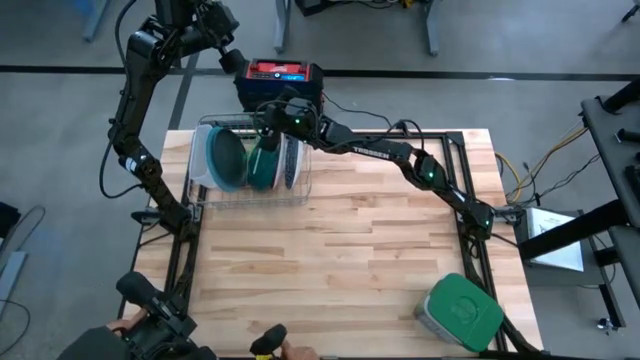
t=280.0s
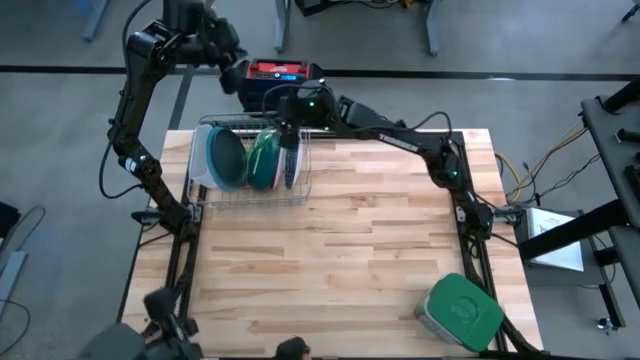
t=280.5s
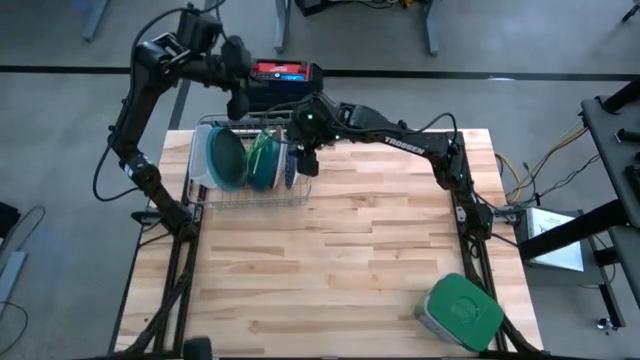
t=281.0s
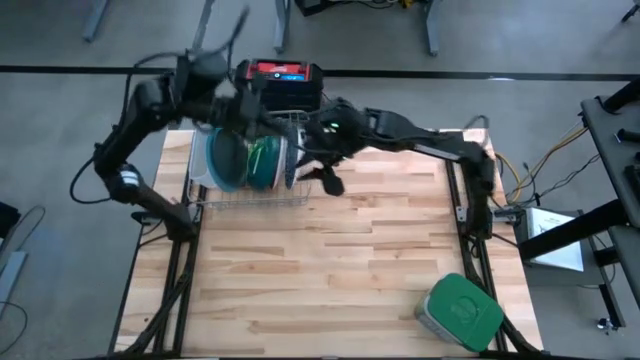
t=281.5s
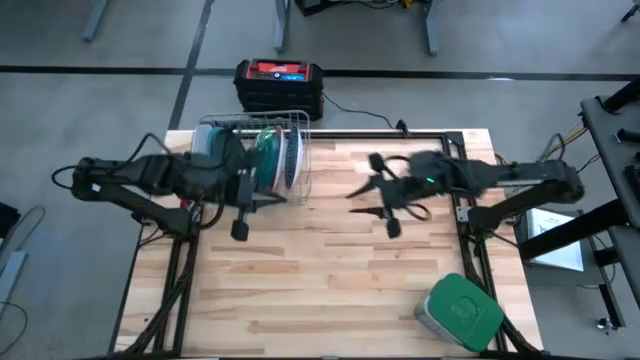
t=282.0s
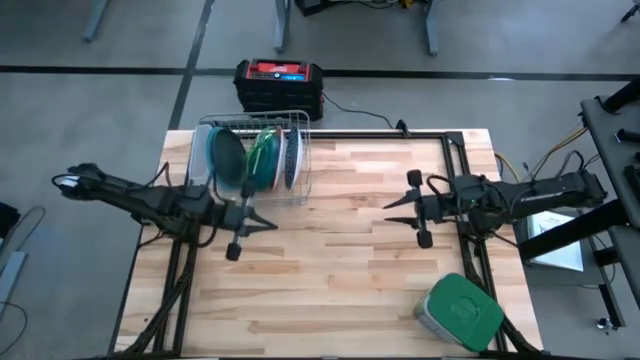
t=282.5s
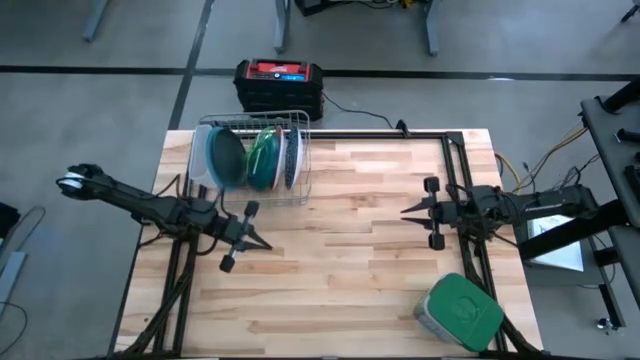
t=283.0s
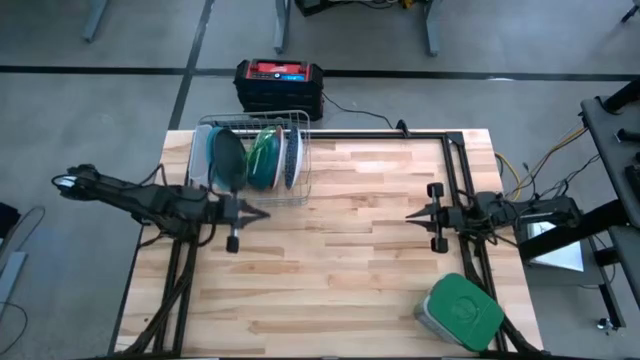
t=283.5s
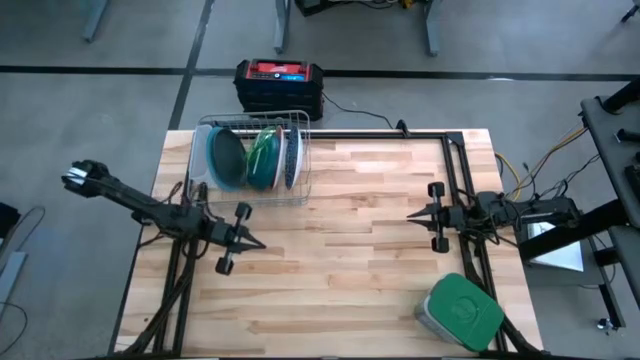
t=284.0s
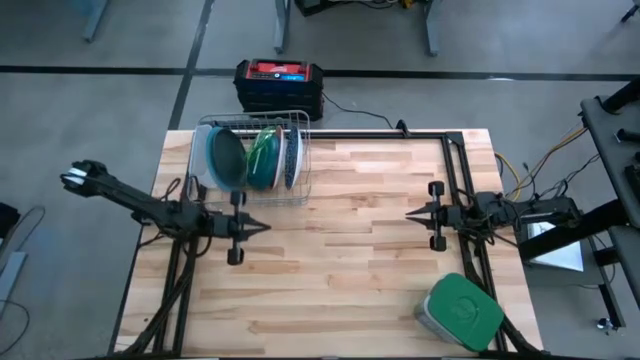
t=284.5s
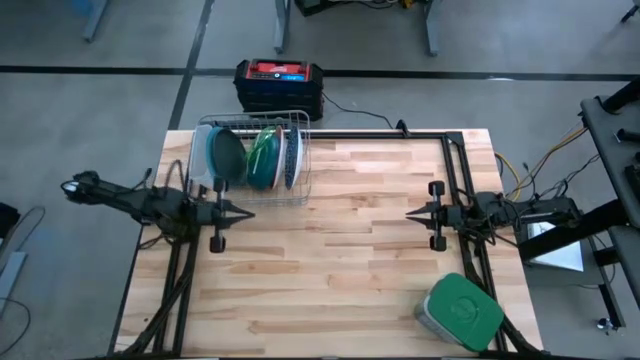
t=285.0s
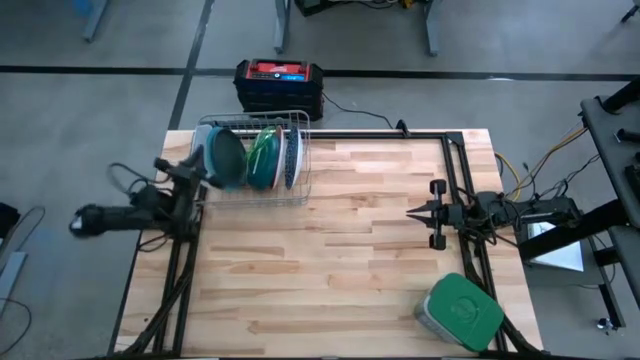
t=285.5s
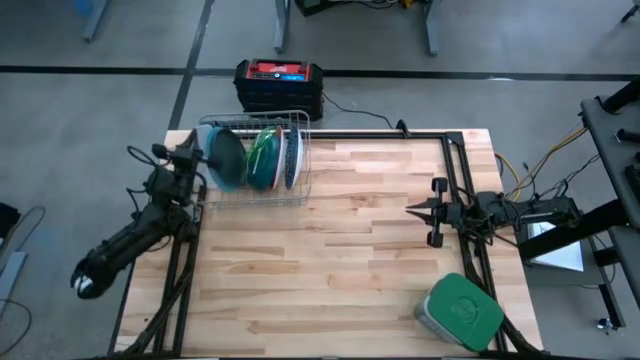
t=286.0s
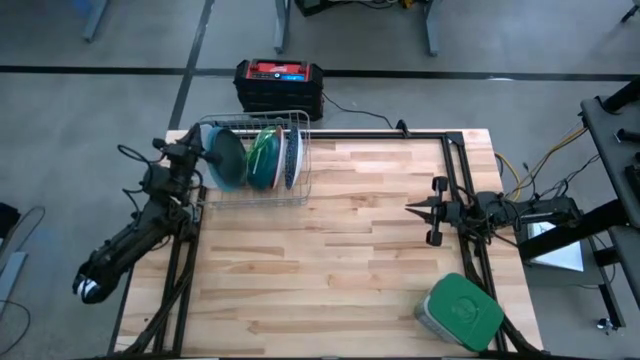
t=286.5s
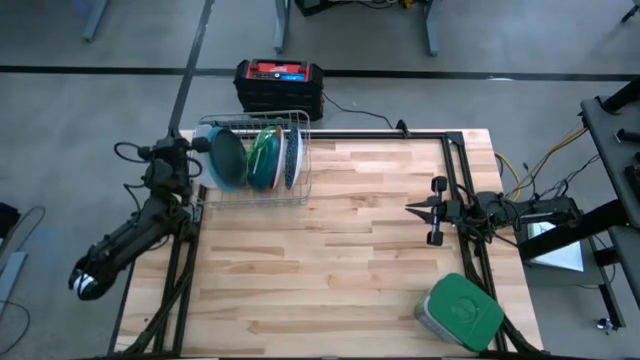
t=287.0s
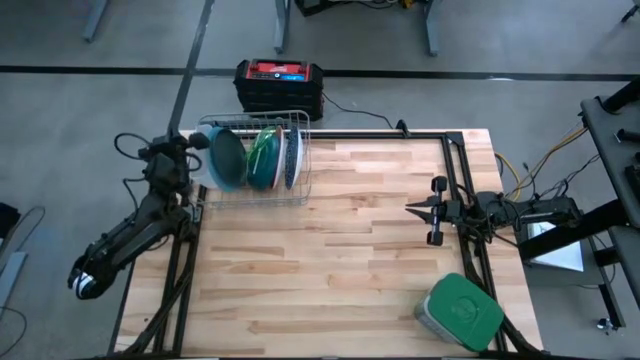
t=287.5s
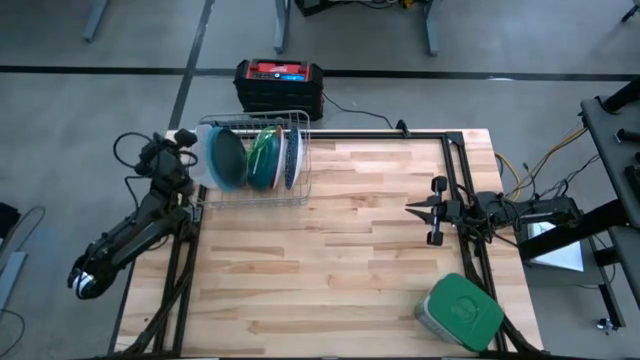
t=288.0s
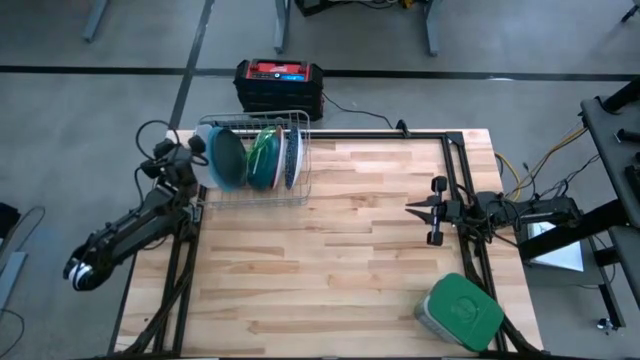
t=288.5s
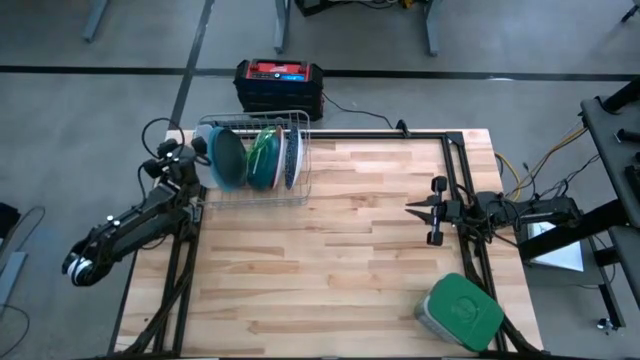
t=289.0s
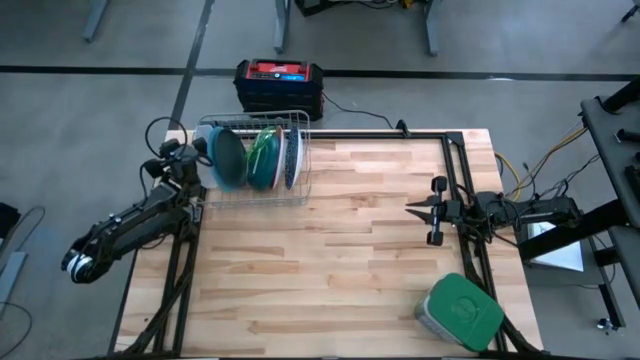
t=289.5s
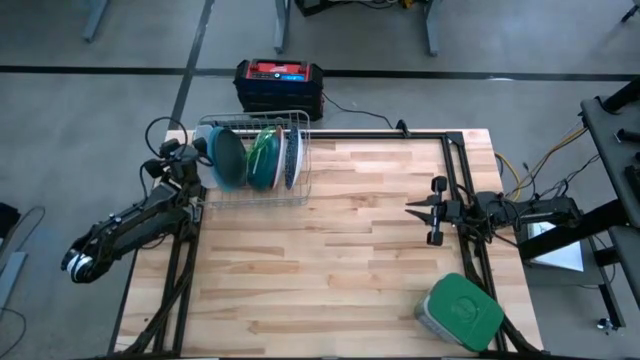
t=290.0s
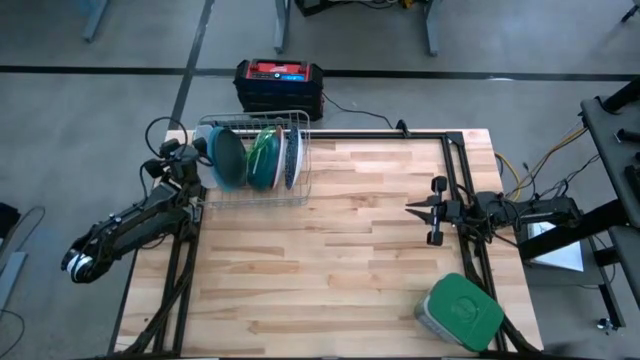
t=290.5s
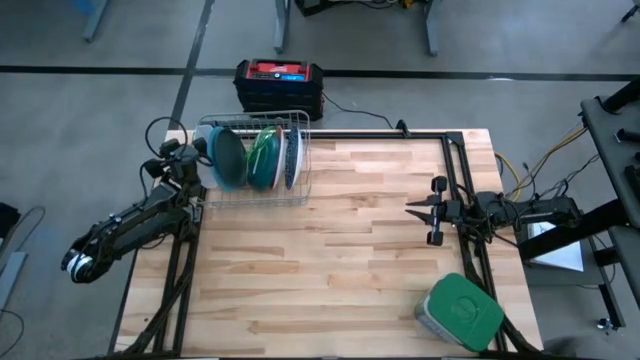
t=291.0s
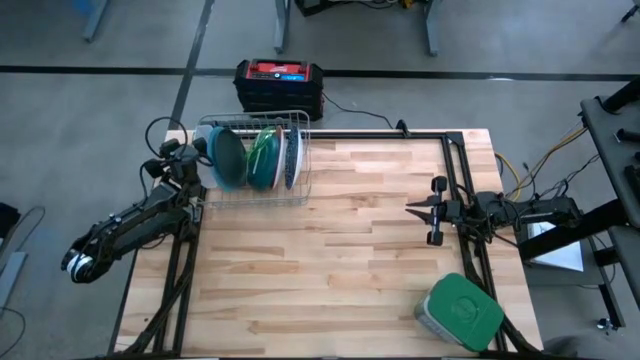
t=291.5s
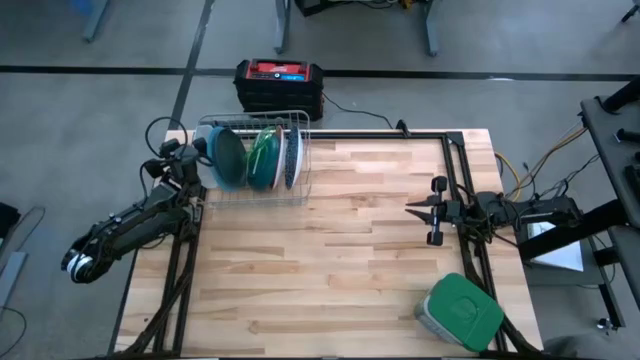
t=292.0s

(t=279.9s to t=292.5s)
Task: Sort dishes
Return to Home Position

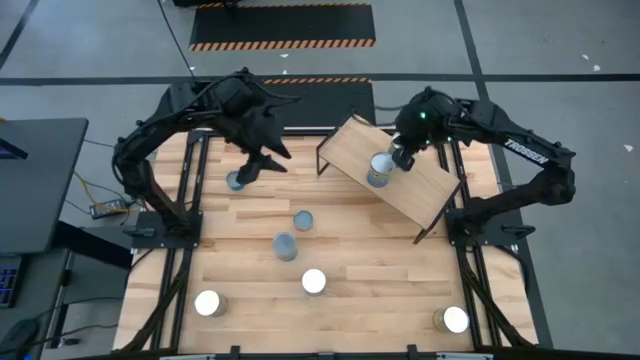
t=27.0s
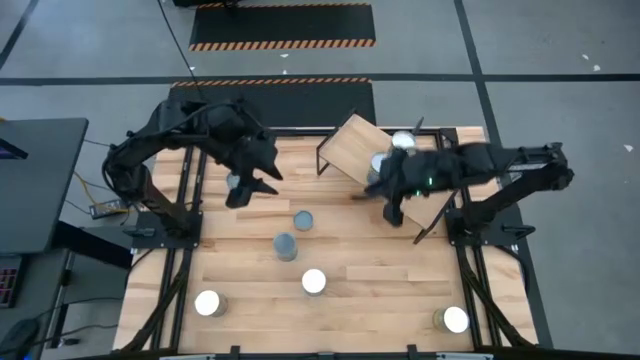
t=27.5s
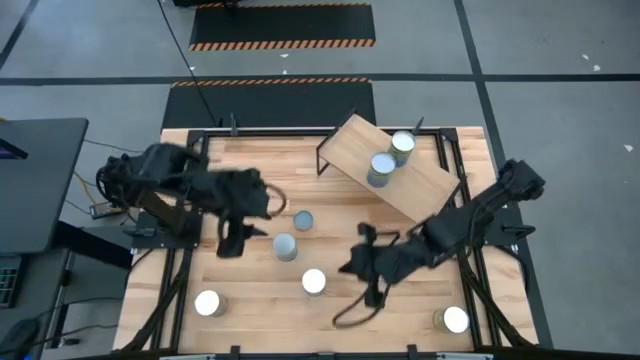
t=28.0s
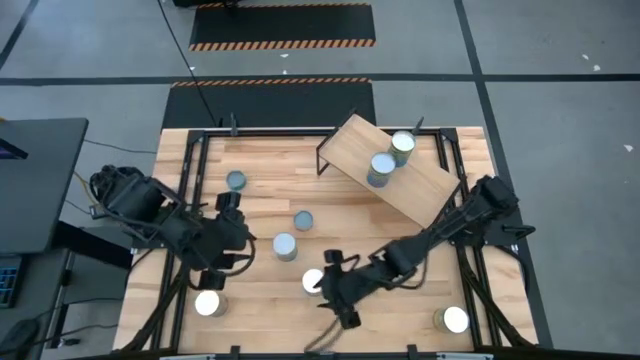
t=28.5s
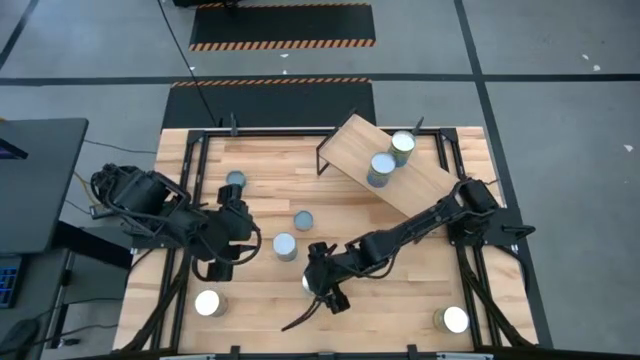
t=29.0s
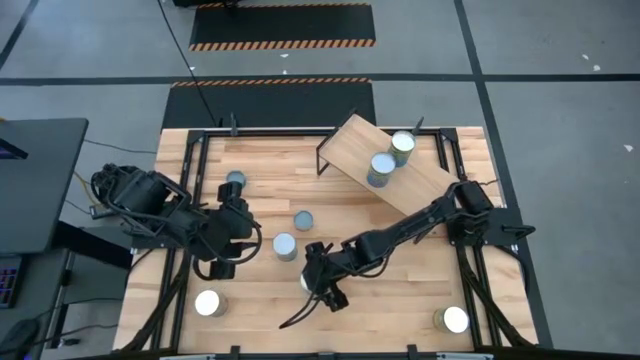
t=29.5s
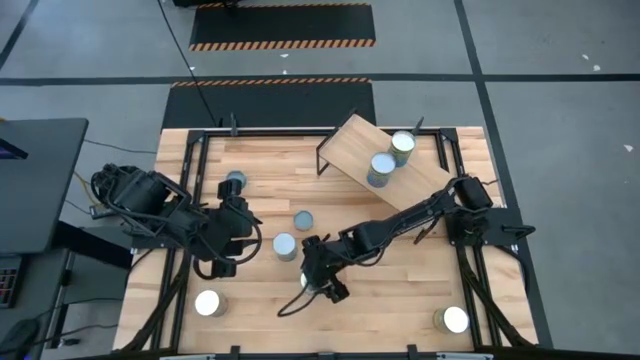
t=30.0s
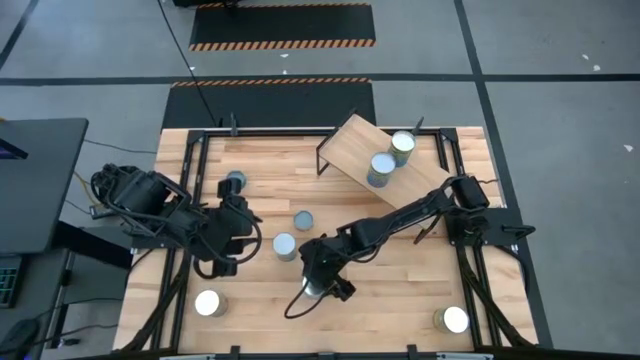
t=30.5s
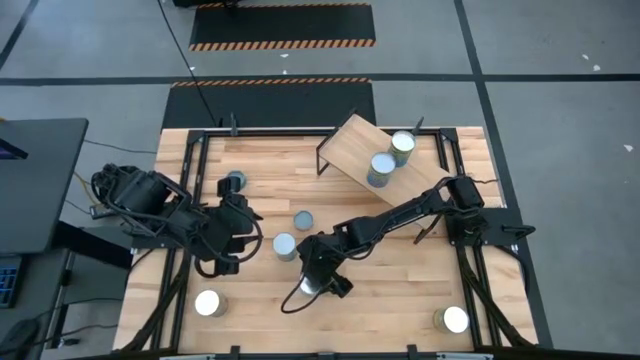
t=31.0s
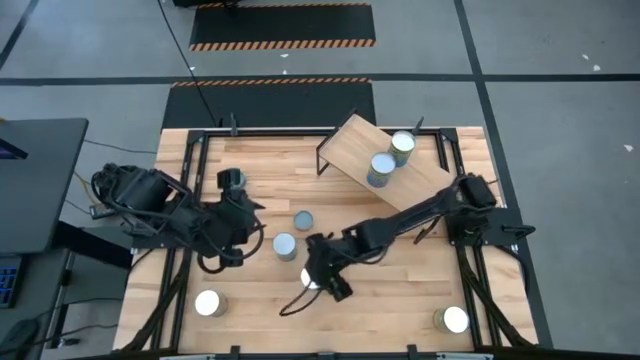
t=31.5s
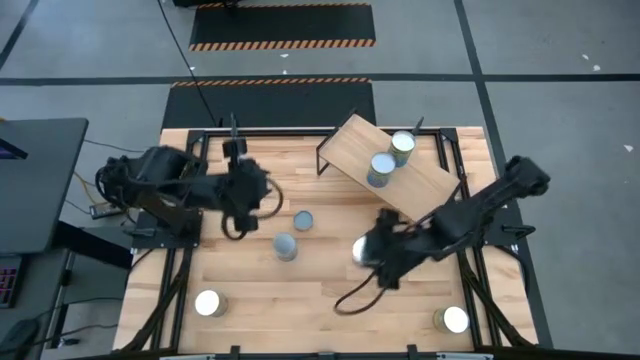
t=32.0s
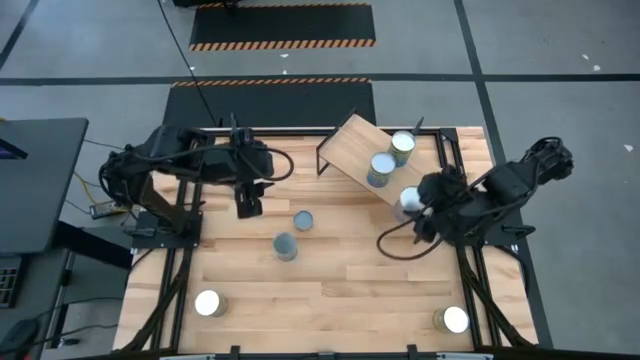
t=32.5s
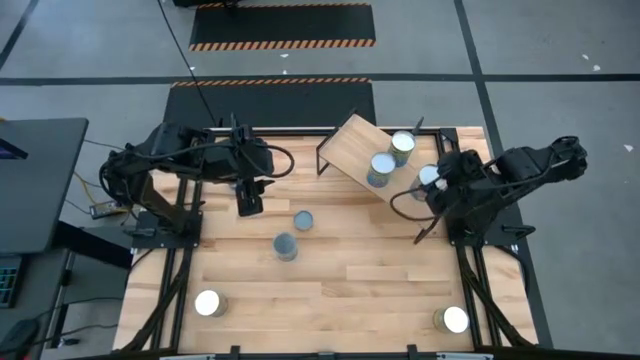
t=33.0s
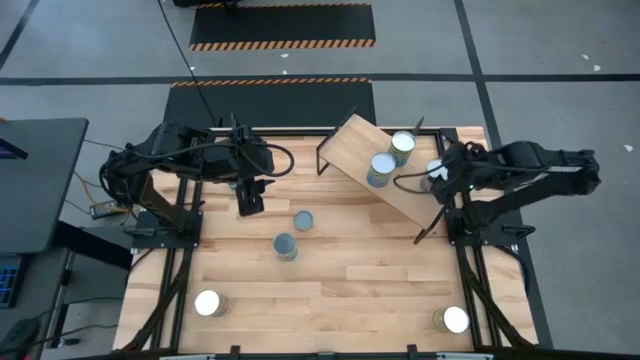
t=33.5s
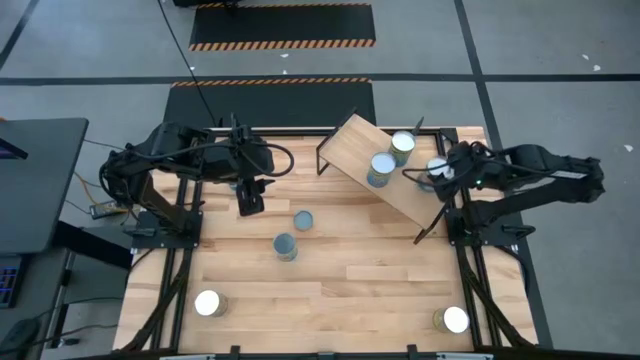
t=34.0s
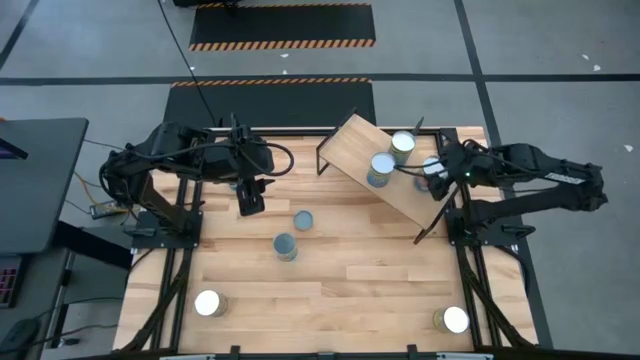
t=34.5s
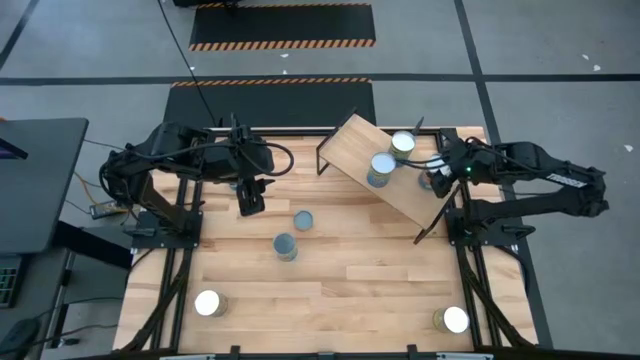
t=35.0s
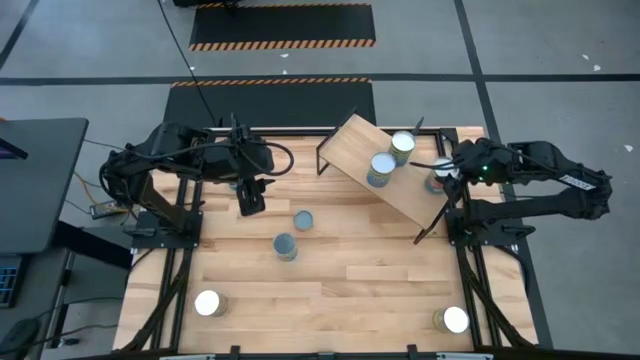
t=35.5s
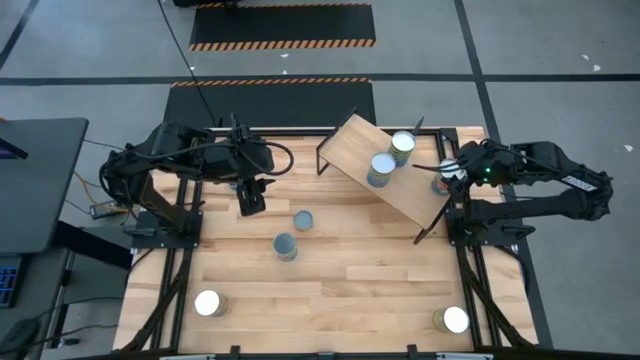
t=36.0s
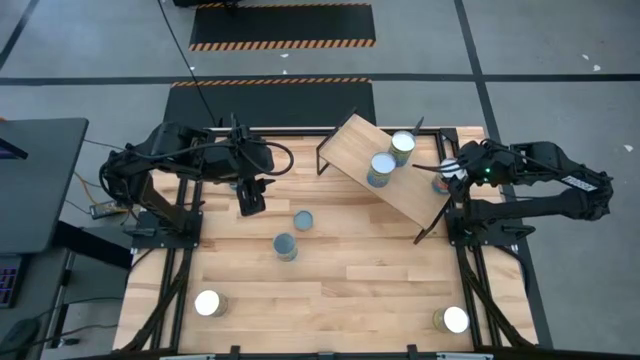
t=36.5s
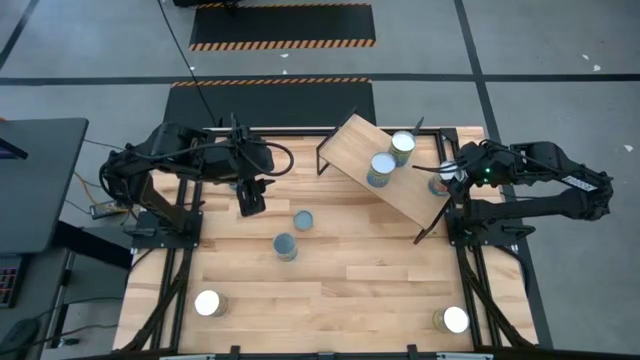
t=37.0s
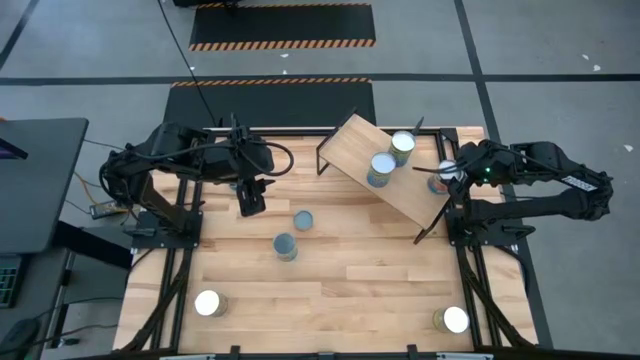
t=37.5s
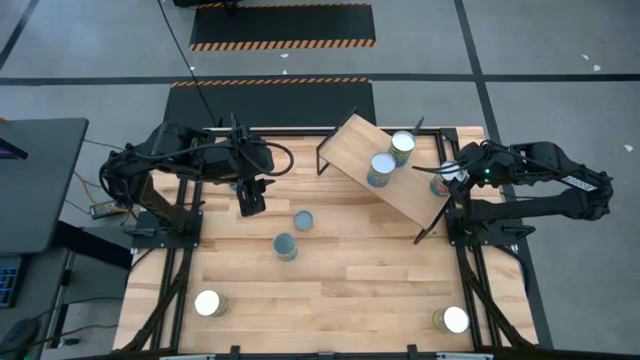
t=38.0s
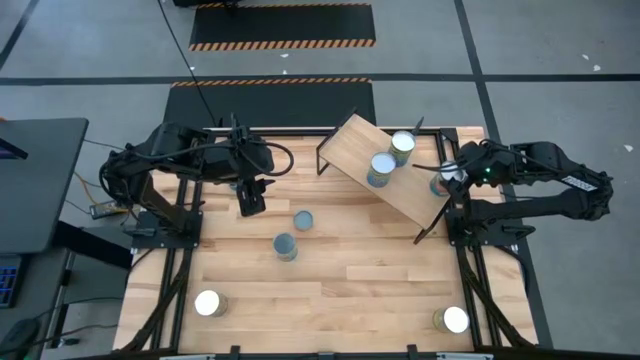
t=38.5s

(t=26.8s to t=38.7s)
Task: Pick and place cans onto a shelf
Put the bottom canned tomatoes on the shelf
